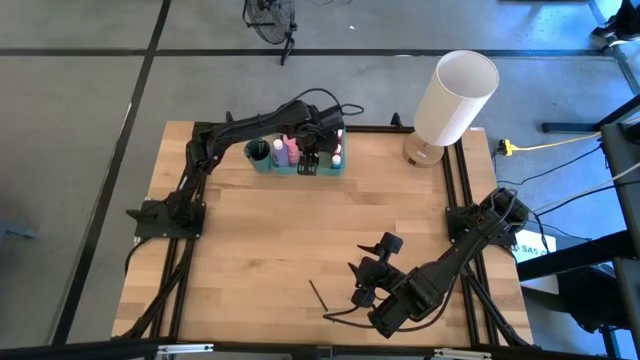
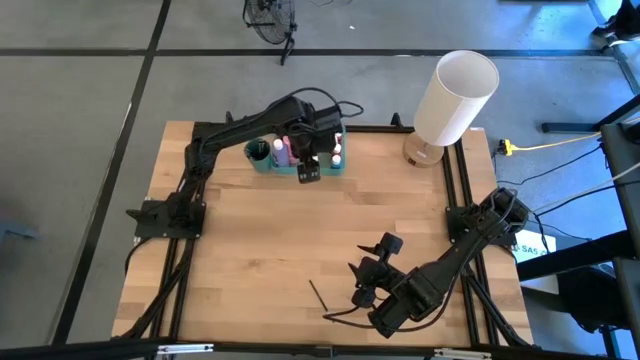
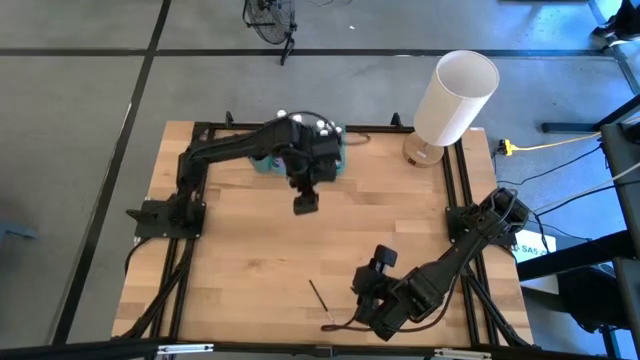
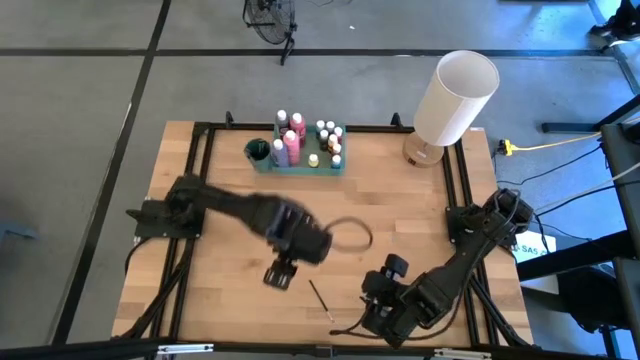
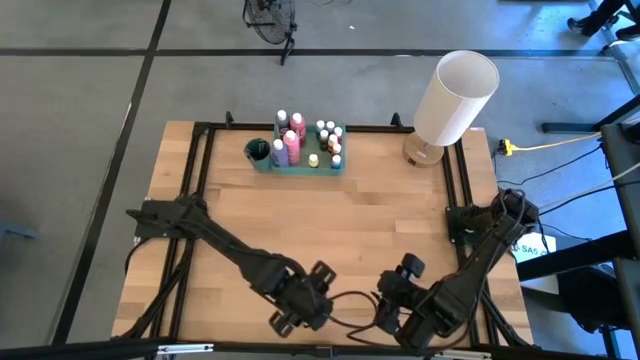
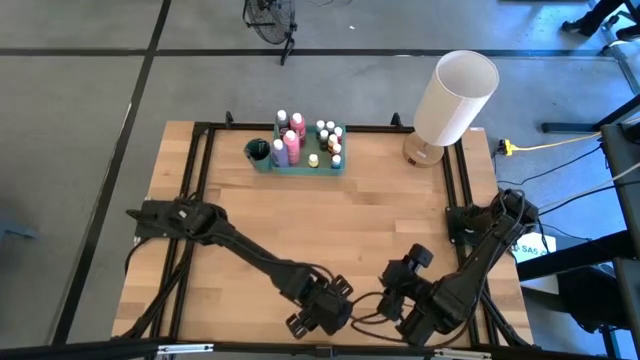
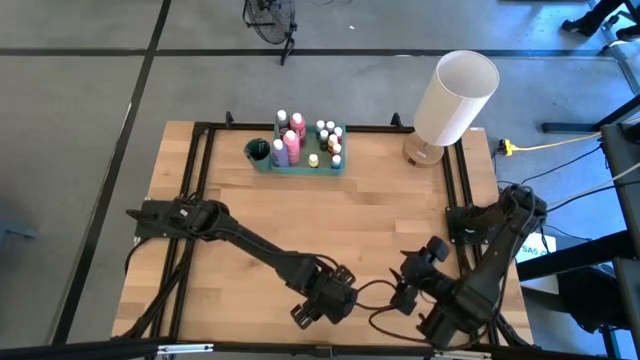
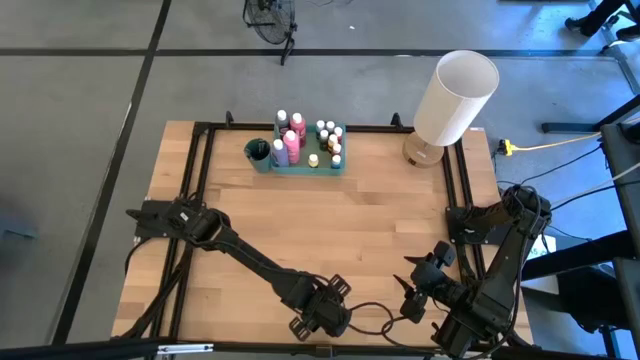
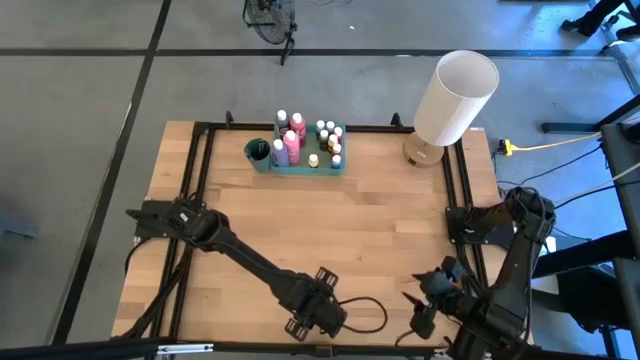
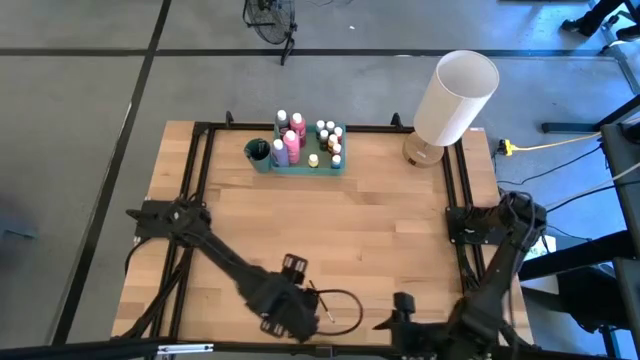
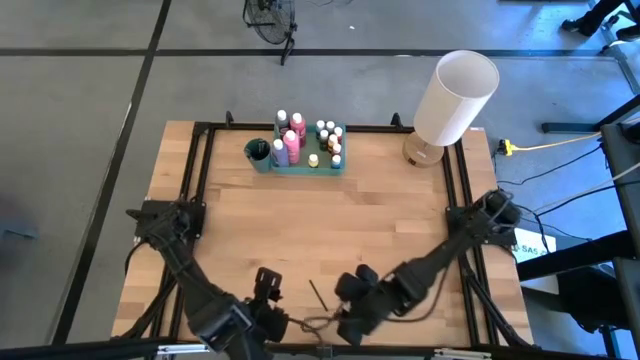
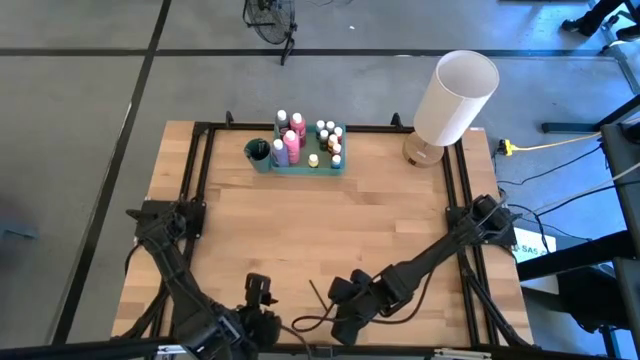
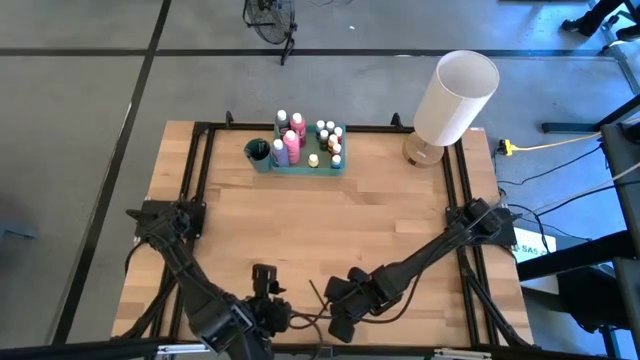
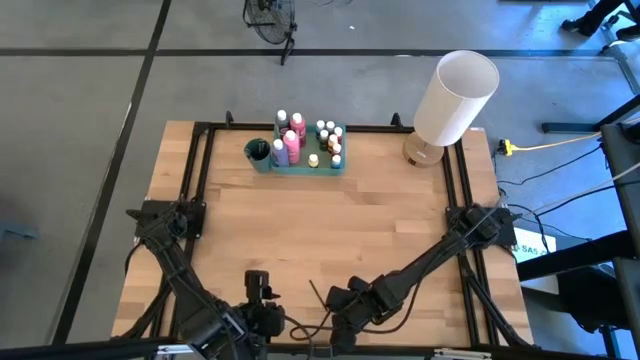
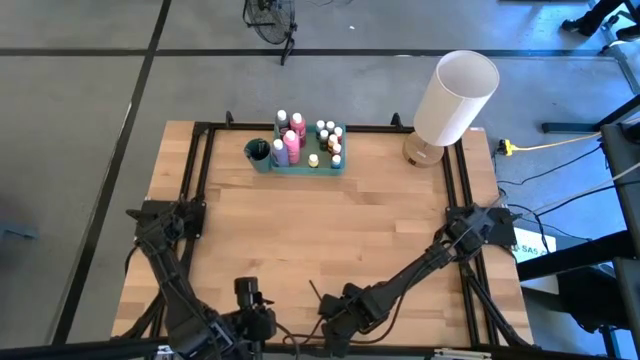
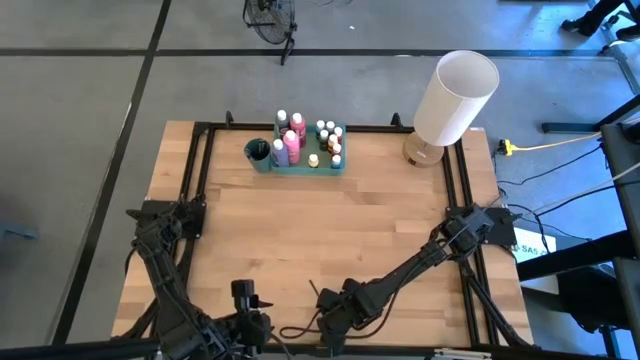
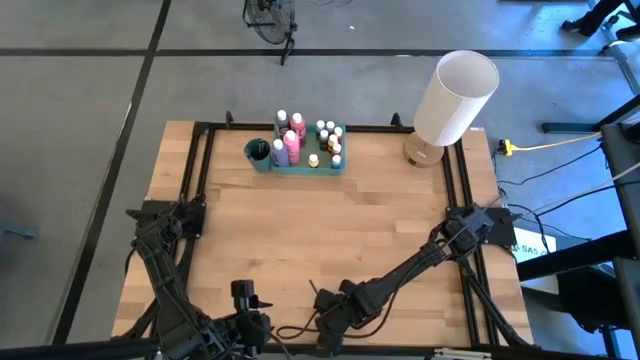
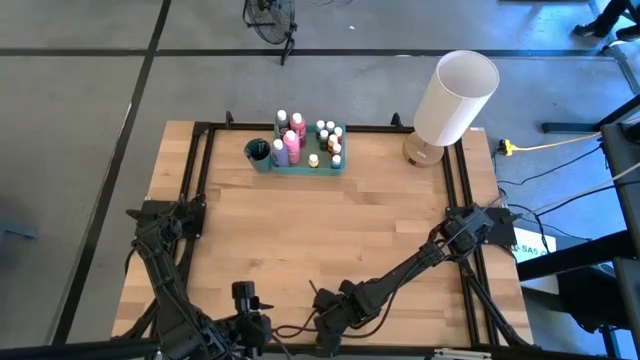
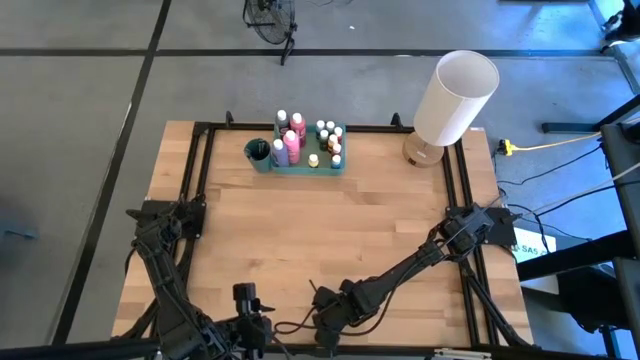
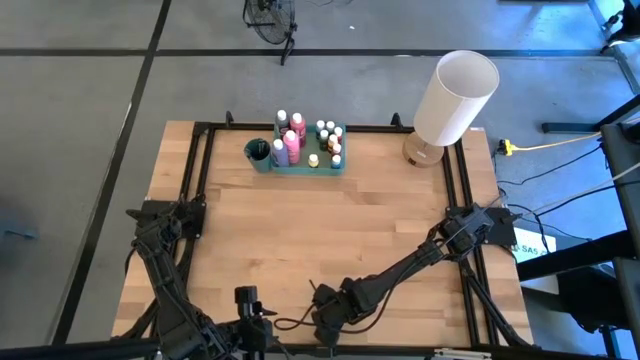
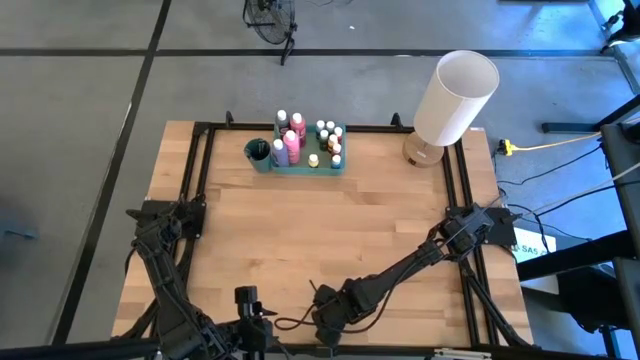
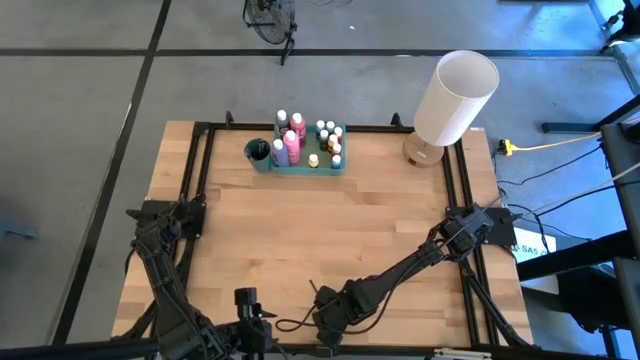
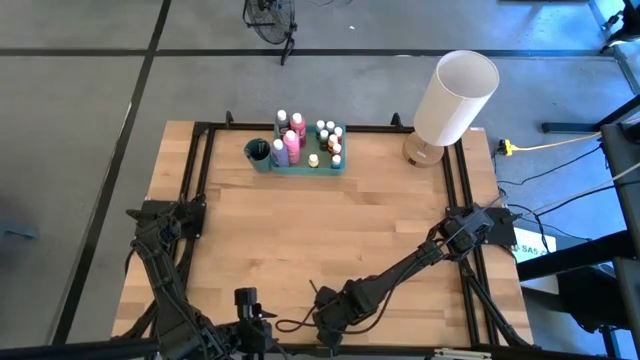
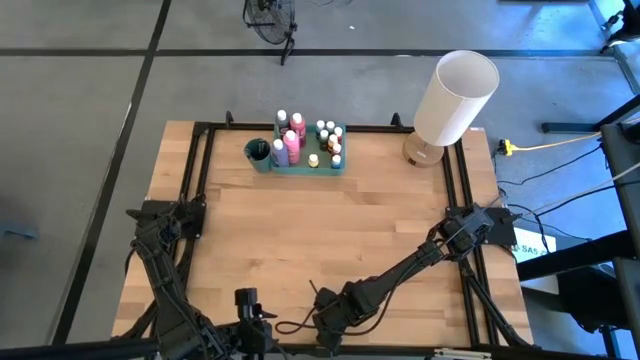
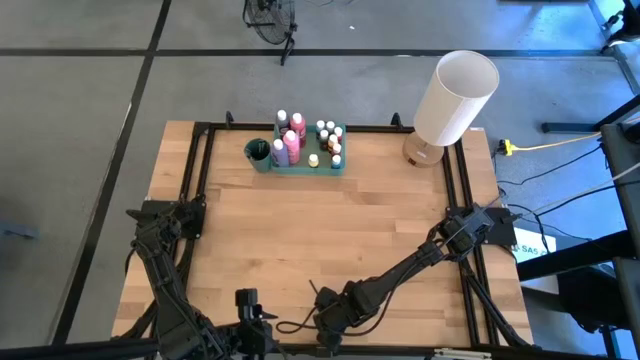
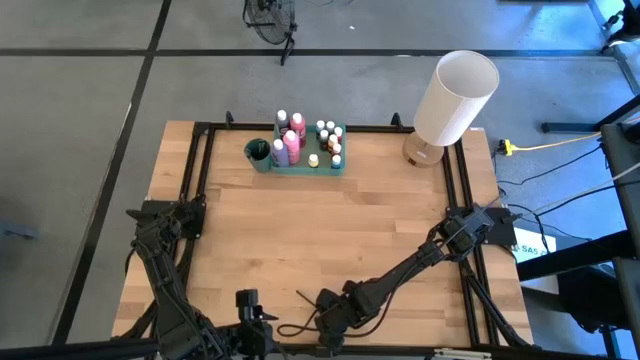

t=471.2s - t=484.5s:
Task: Pick & Place Paint Supplies
Put the silver paintbrush into the green cup

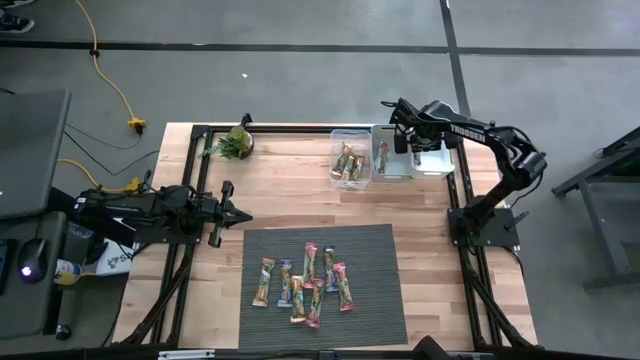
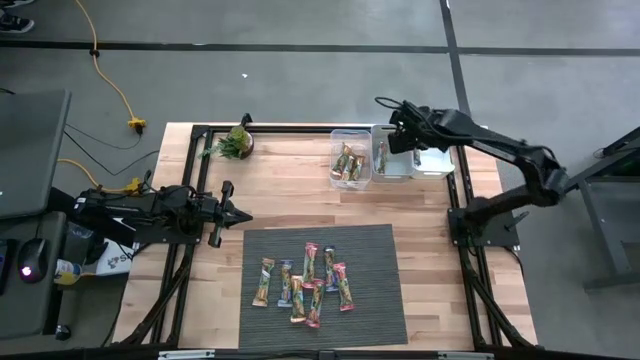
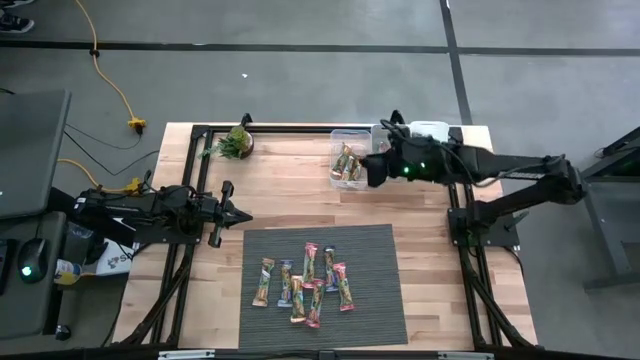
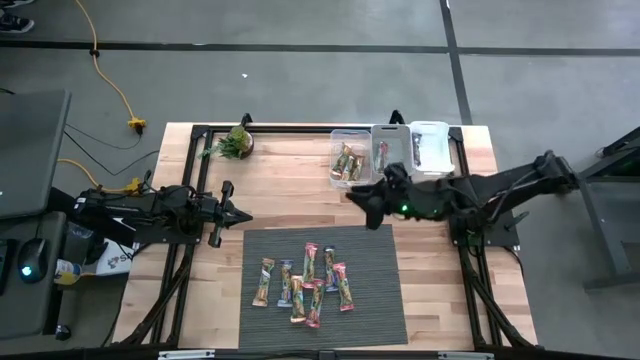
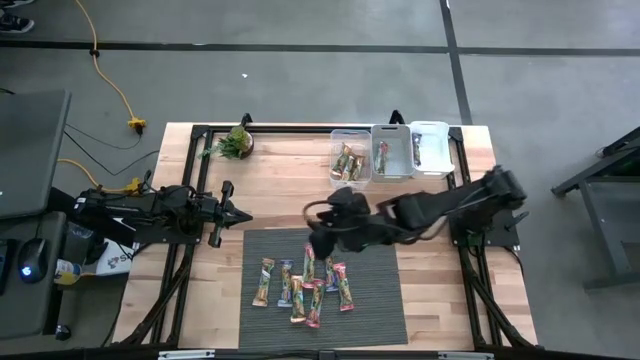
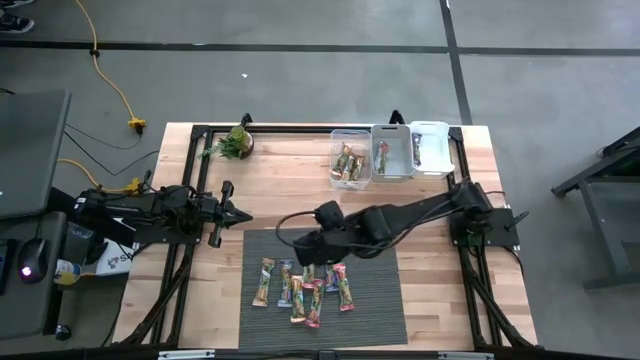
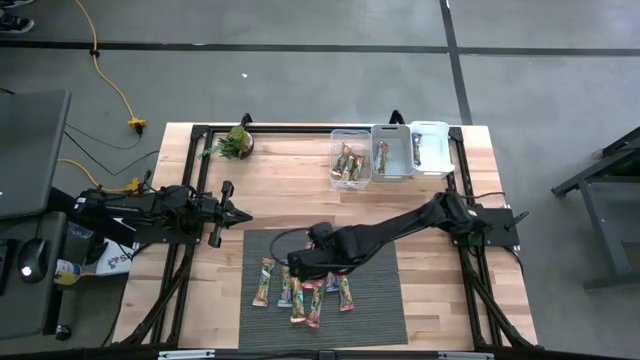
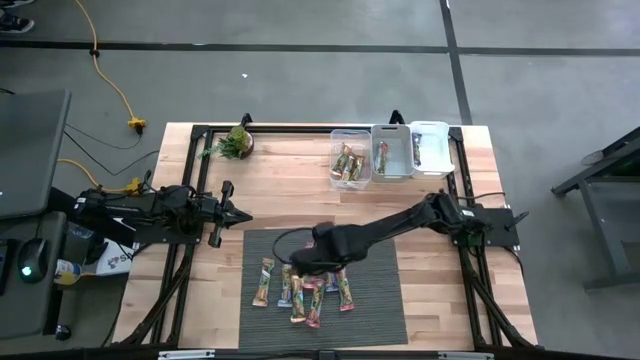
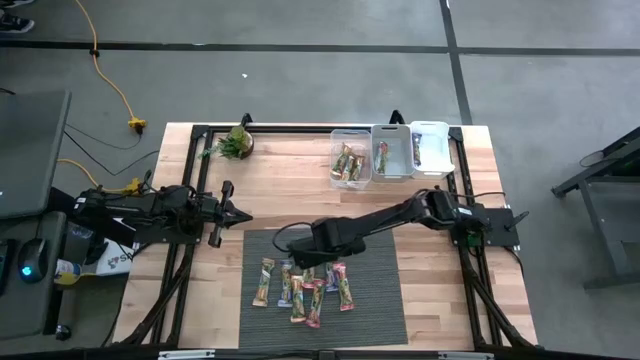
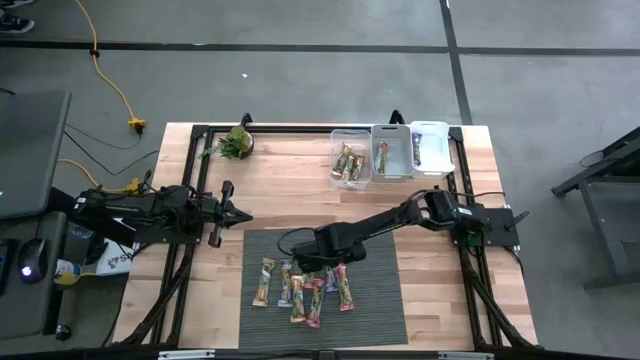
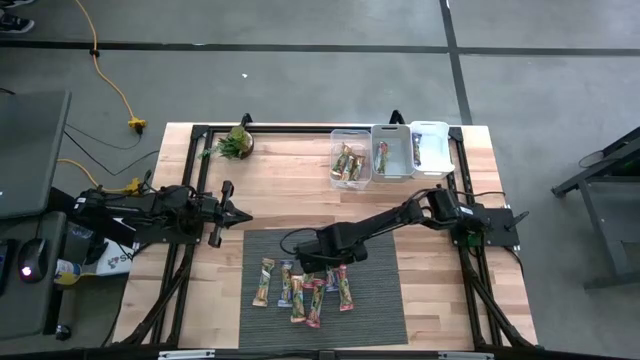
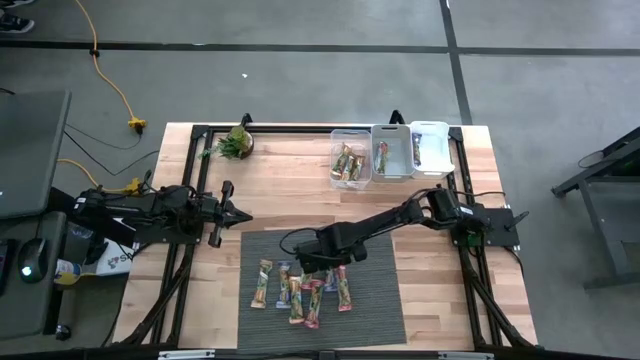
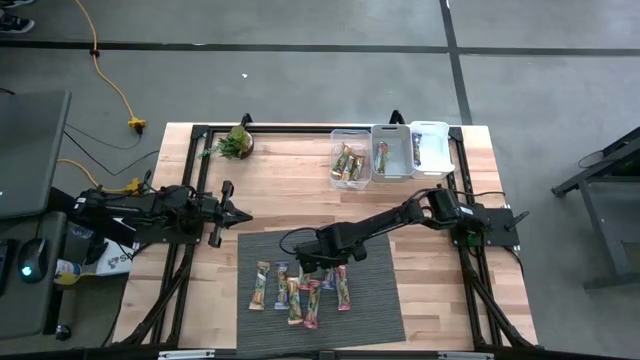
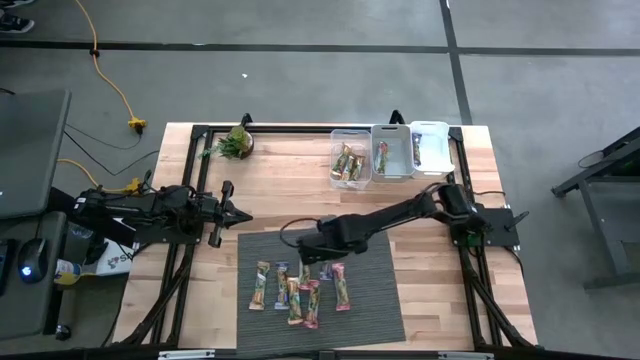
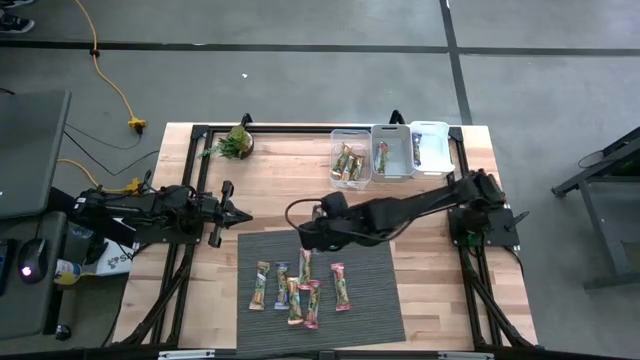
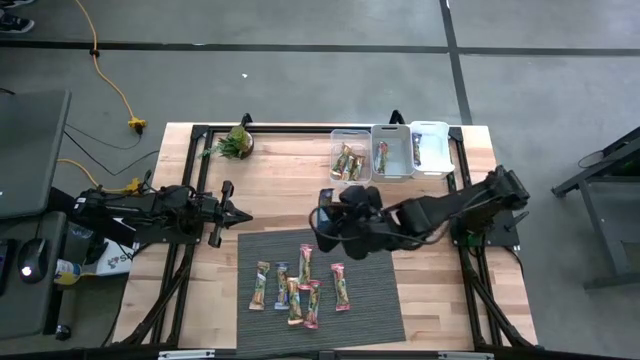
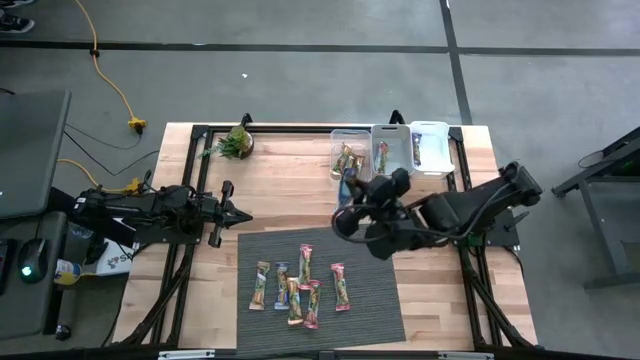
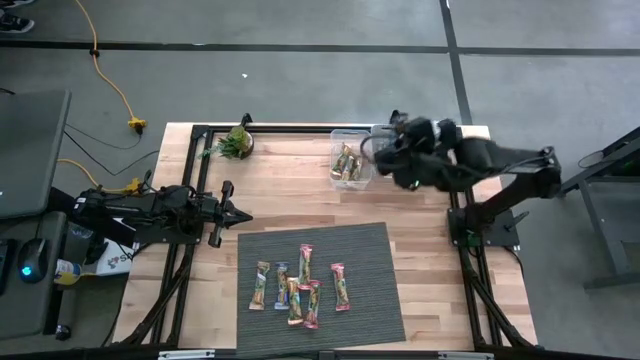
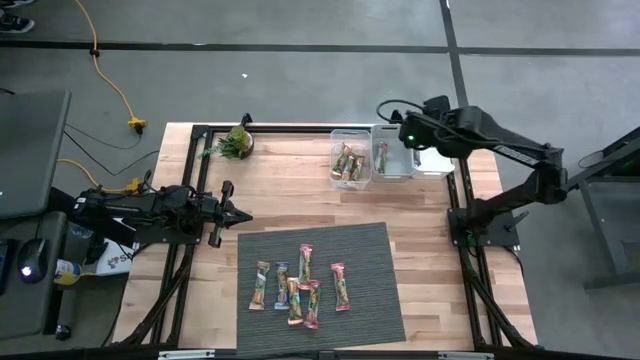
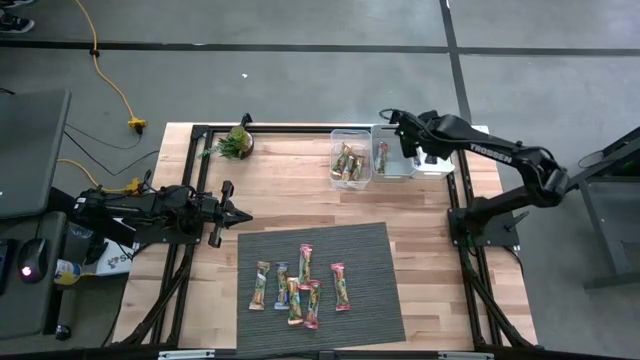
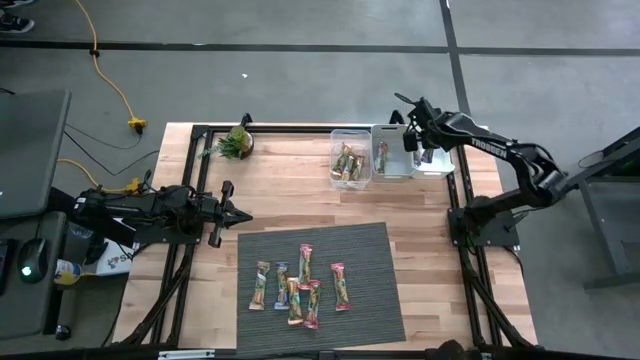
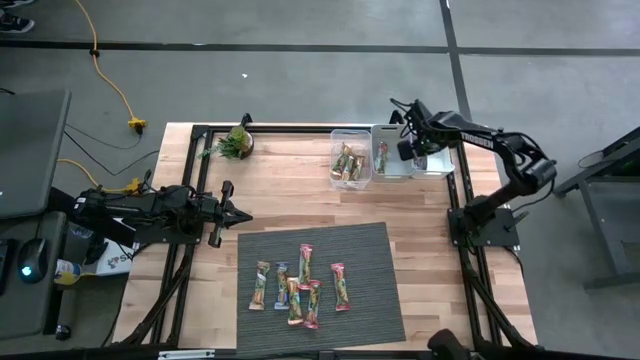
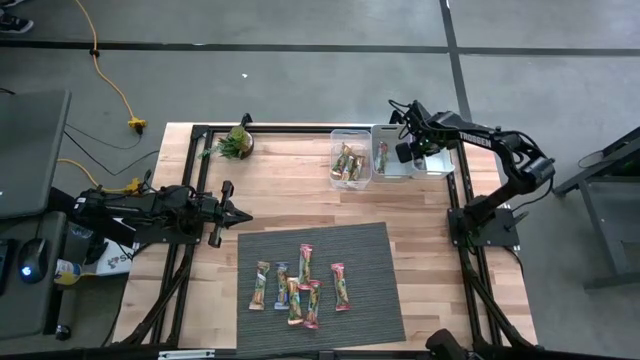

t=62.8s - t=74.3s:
Task: Pick and place Granola Bars by type
Put the blue granola bar into the white bin
